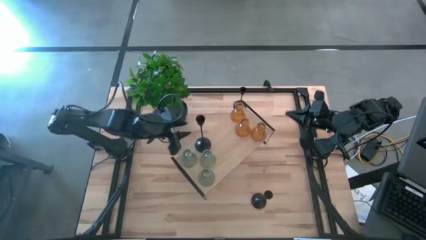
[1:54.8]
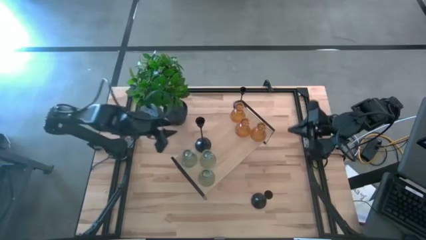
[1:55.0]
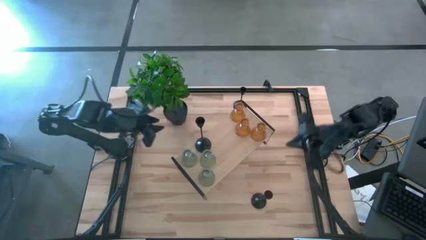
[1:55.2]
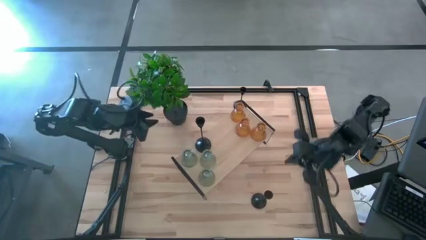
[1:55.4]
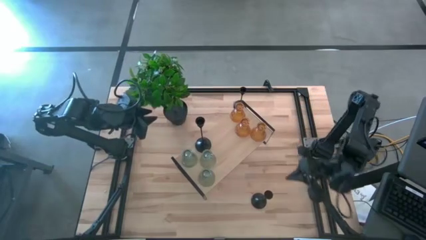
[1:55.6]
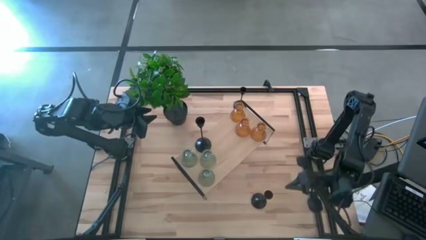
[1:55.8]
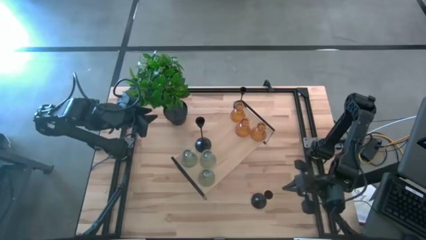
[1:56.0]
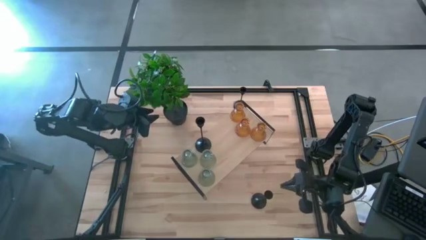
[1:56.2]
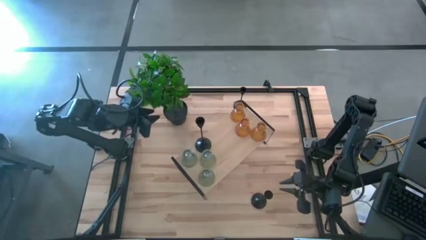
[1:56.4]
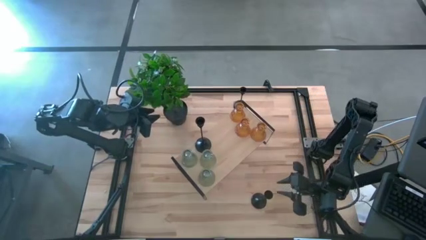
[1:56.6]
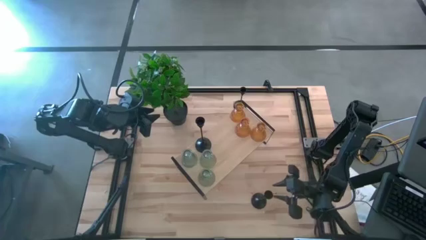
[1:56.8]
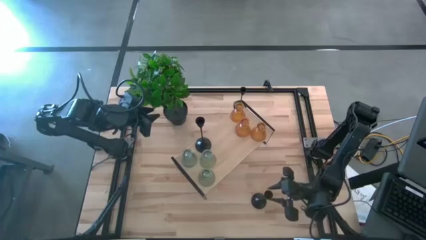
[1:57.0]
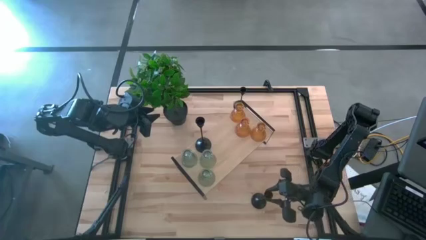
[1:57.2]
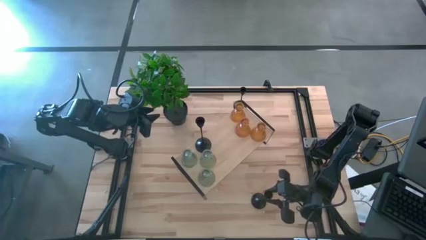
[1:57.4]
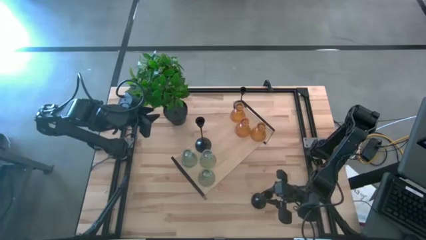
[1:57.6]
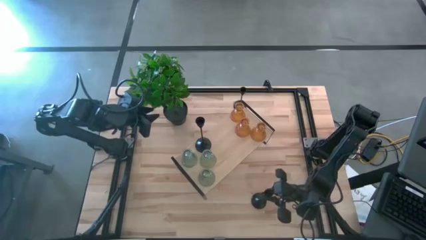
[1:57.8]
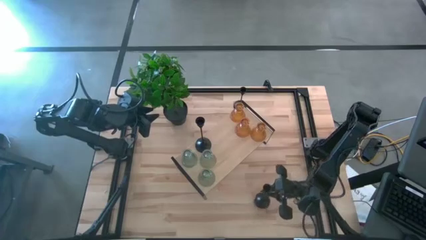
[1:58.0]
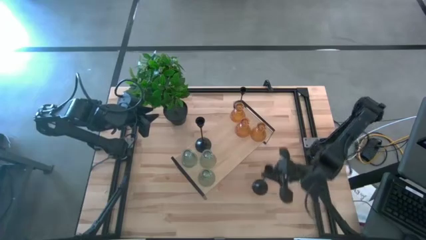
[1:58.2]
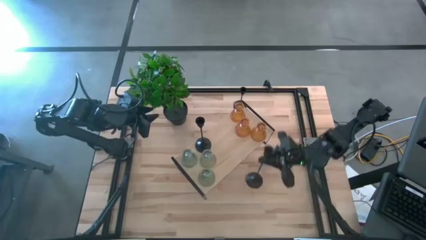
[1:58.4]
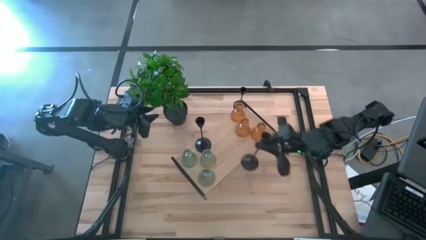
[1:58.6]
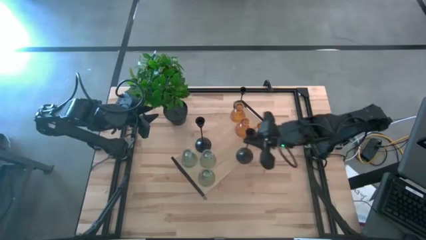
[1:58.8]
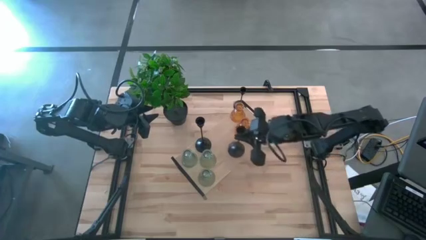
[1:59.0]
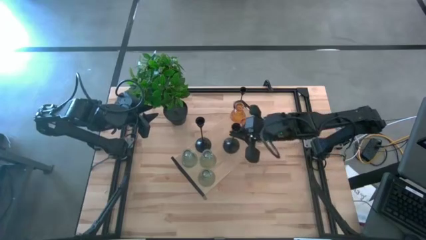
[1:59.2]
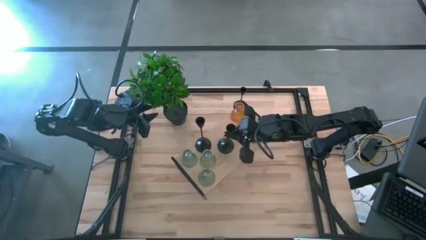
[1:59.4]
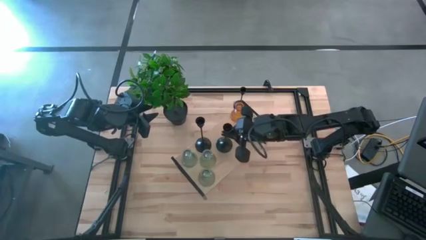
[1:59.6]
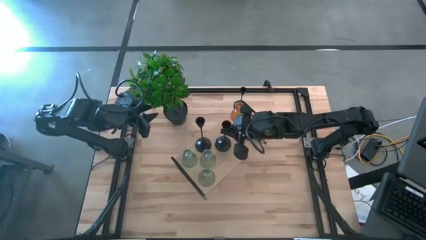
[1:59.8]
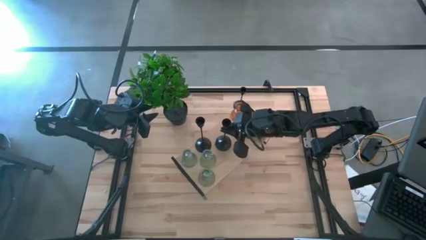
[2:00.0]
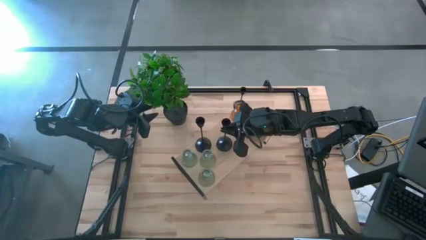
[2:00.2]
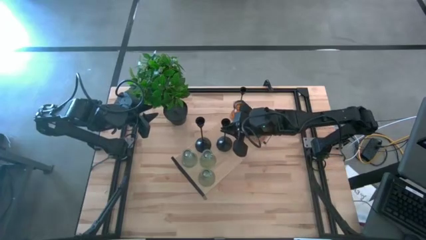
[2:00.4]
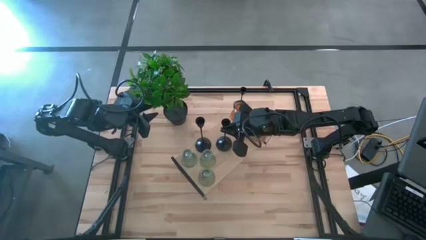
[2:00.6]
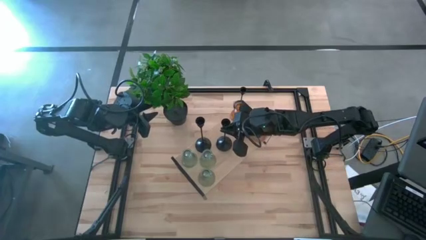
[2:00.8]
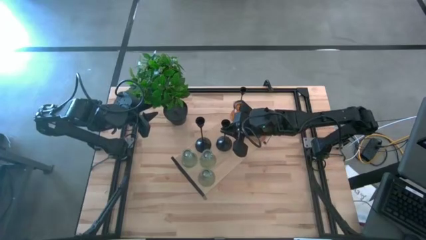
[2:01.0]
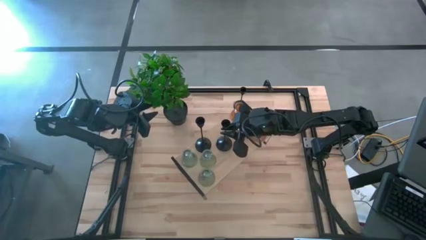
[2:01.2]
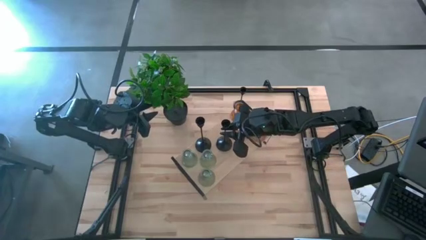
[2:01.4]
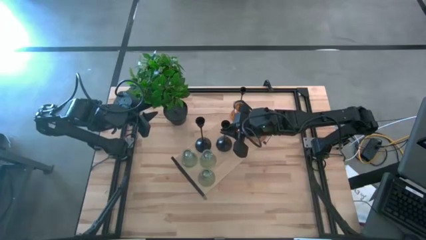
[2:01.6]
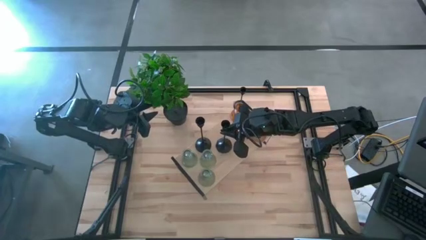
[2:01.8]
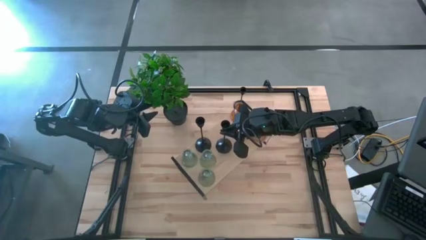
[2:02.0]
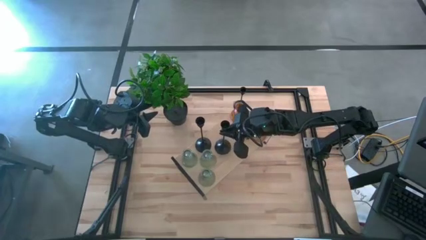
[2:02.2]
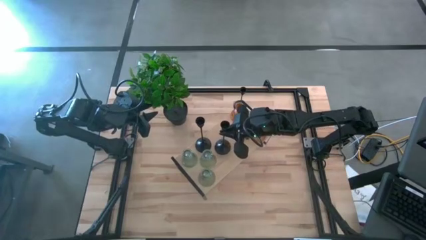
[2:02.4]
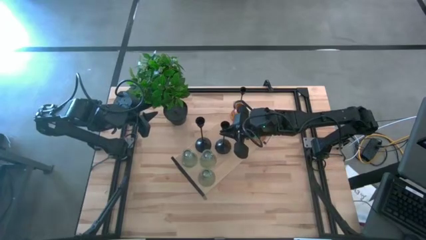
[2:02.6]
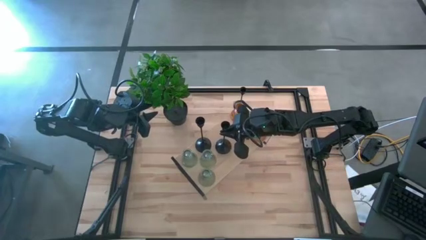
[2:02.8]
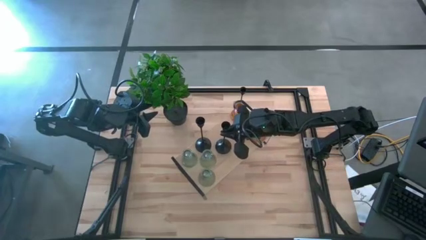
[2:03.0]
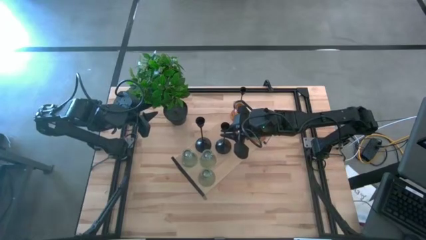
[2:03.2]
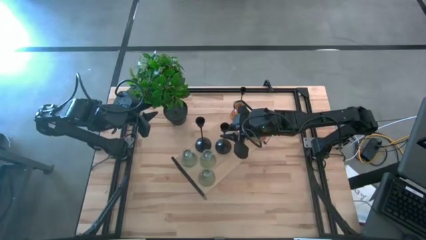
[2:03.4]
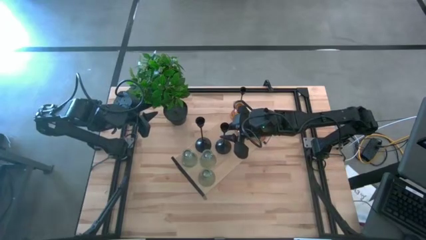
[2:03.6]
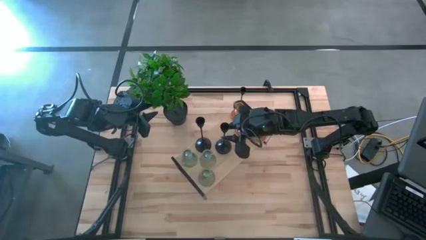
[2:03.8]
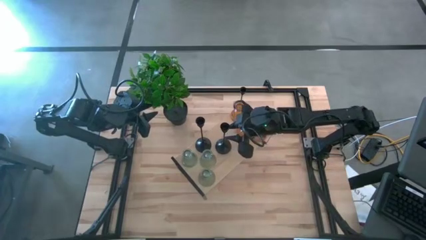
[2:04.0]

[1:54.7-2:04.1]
Task: Pick & Place candle stick holders
Put the bottom right black candle holder on the shelf

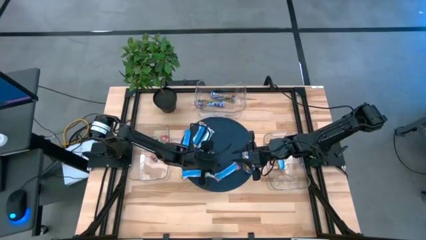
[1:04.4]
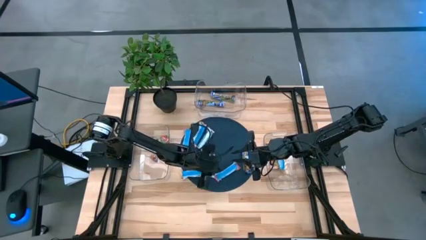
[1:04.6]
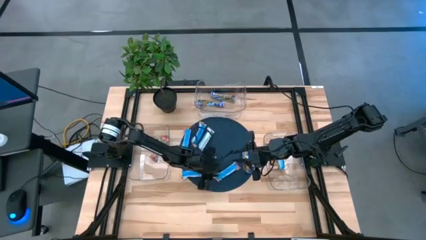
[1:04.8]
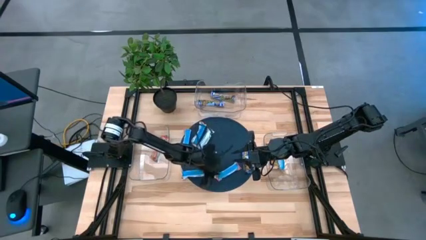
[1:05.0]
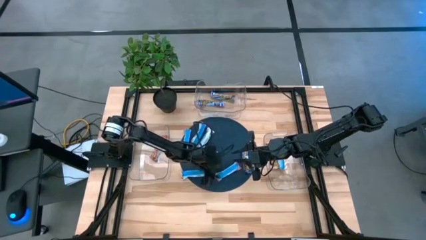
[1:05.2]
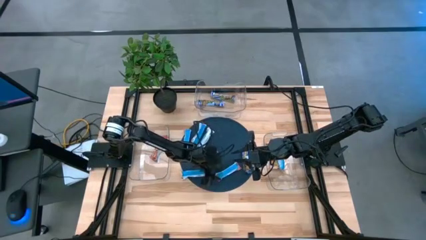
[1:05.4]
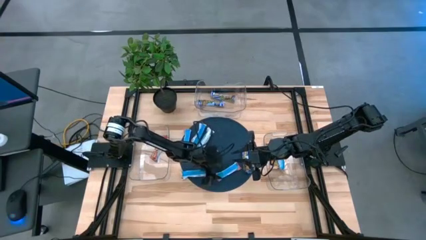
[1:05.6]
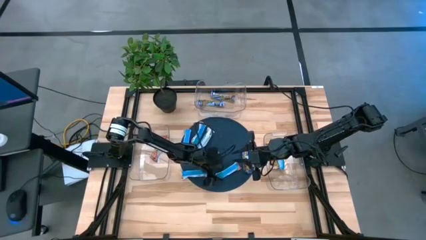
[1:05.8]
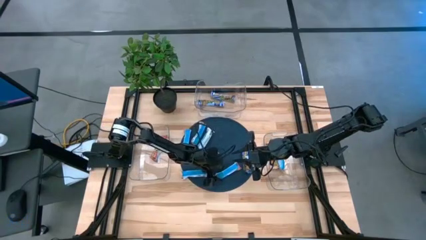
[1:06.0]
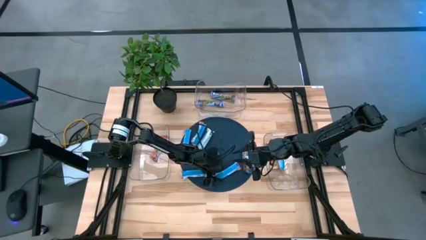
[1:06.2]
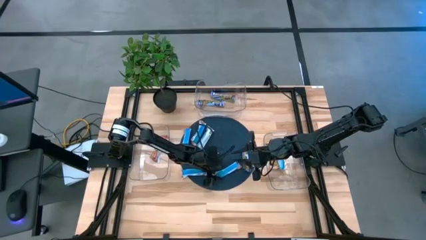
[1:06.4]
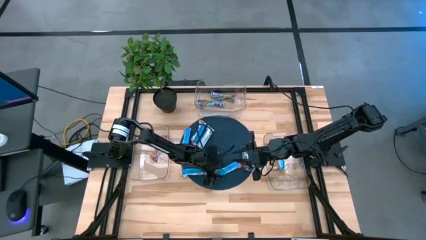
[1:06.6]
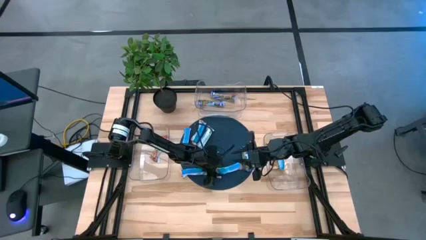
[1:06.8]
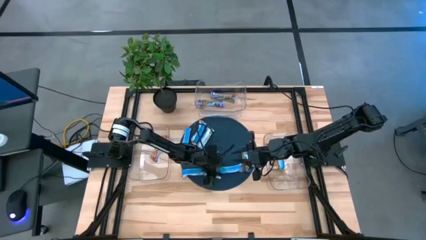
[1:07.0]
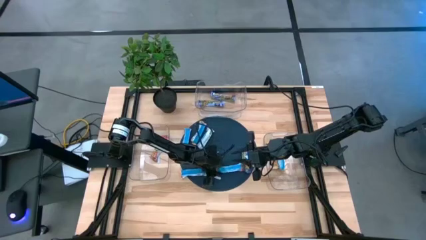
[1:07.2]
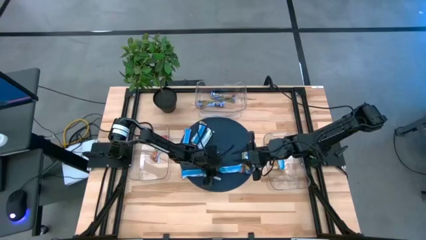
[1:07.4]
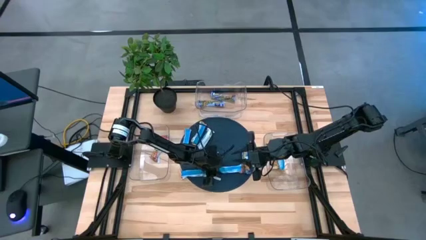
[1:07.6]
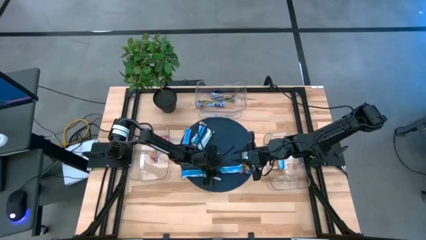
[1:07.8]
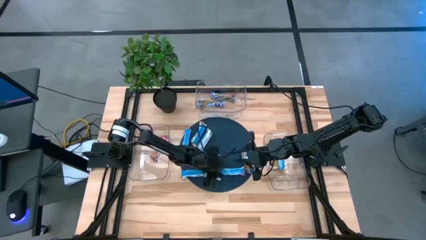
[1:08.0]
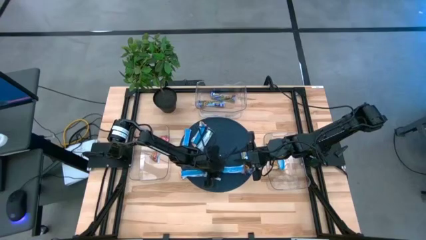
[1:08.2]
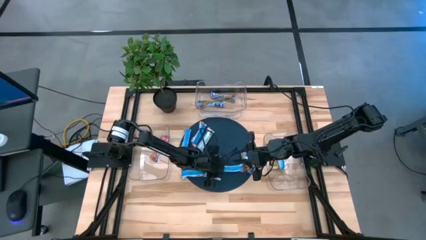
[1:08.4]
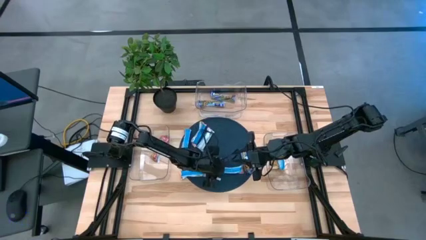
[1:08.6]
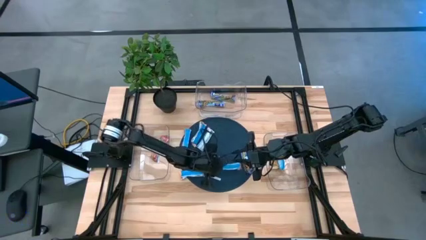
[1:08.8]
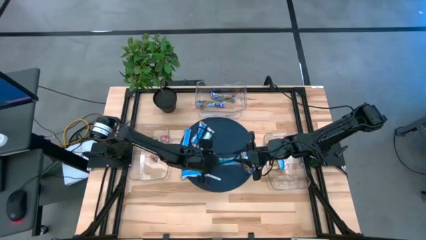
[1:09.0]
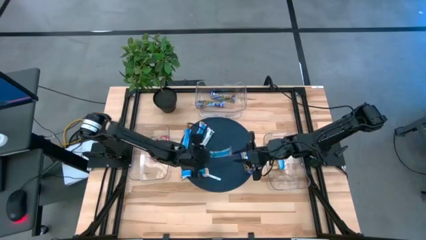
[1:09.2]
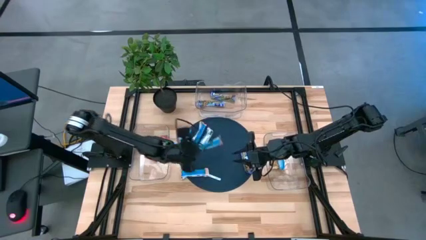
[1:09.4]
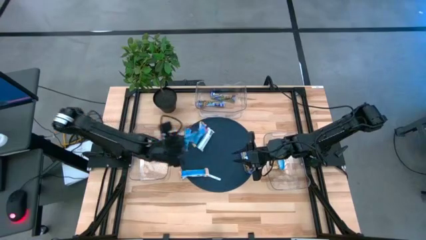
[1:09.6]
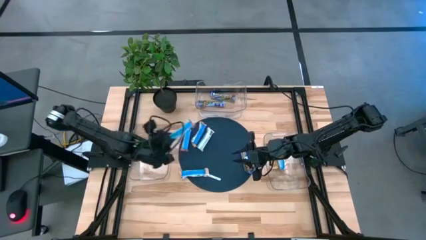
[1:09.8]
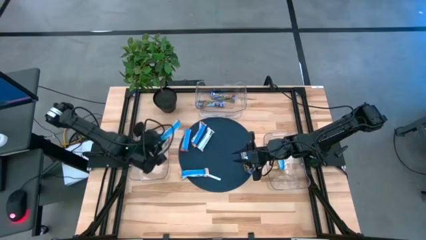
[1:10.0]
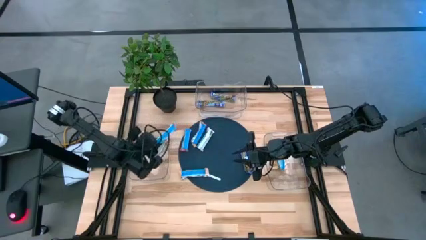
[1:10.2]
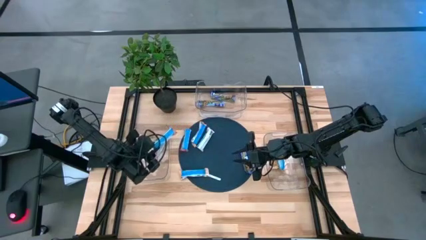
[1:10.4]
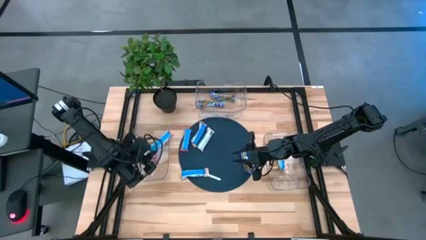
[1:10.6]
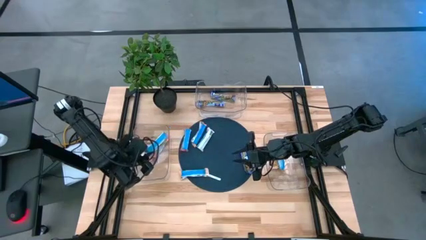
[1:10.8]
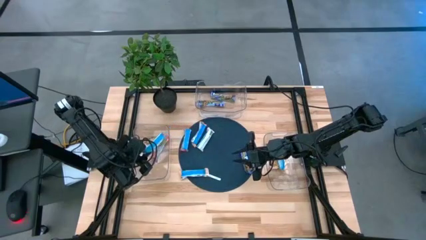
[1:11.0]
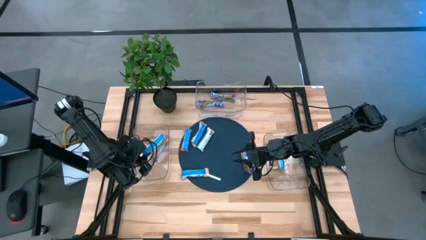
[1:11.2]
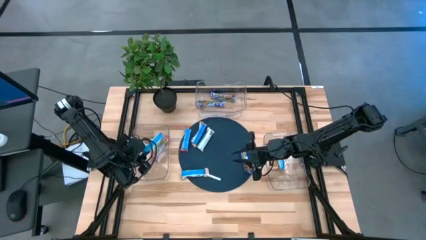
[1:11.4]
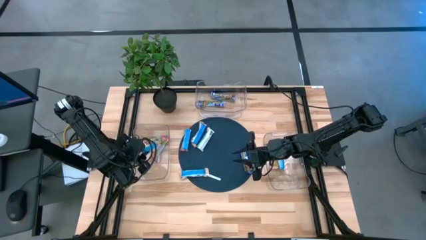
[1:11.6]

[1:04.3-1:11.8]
Task: Pick and place Granola Bars by type
Put the bottom red granola bar into the left transparent bin
